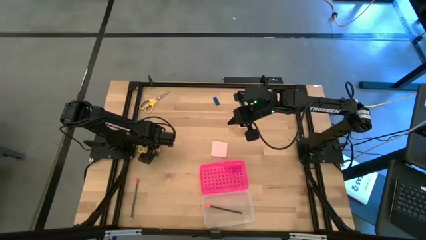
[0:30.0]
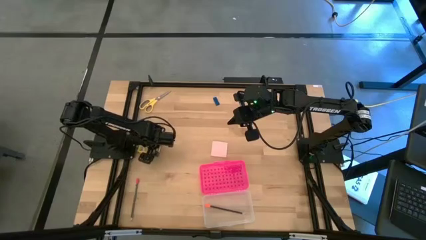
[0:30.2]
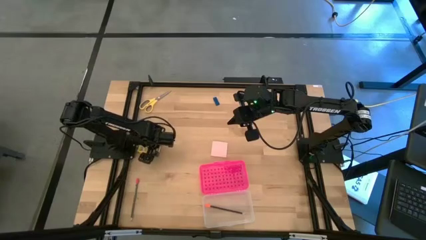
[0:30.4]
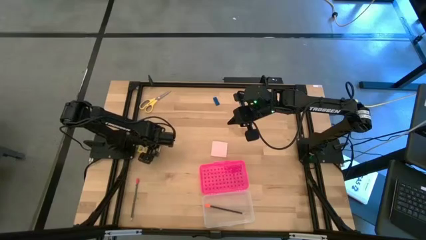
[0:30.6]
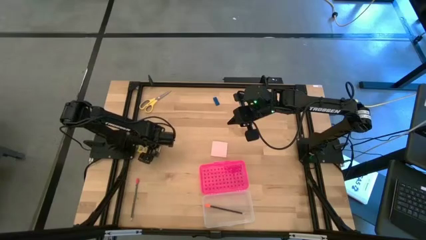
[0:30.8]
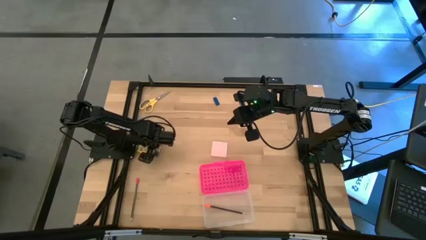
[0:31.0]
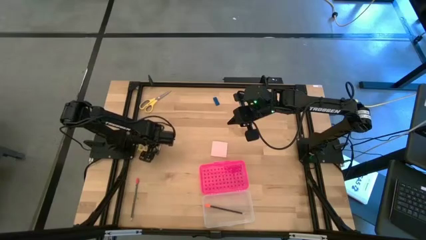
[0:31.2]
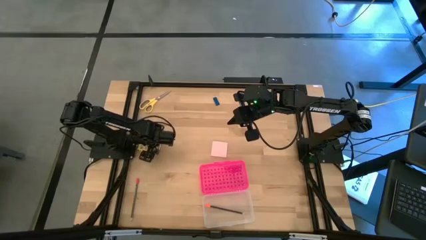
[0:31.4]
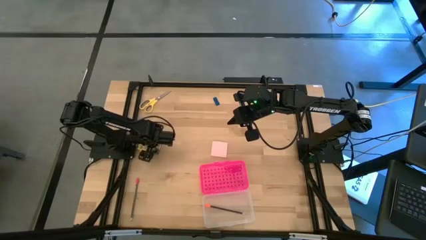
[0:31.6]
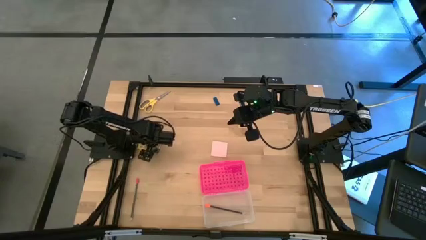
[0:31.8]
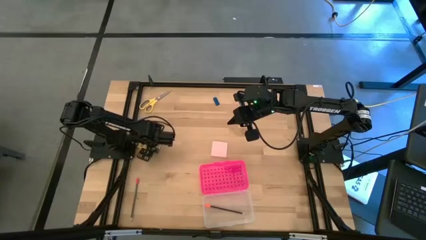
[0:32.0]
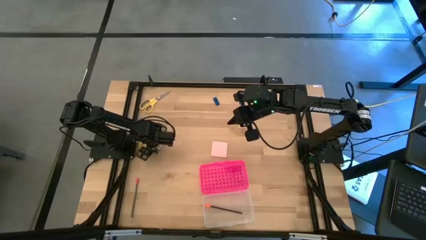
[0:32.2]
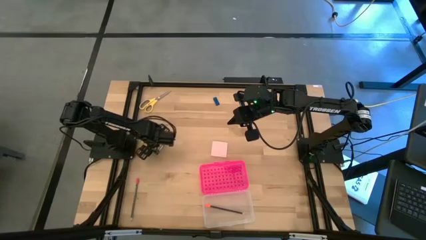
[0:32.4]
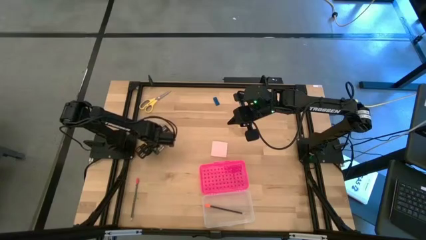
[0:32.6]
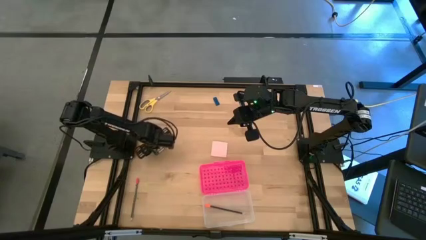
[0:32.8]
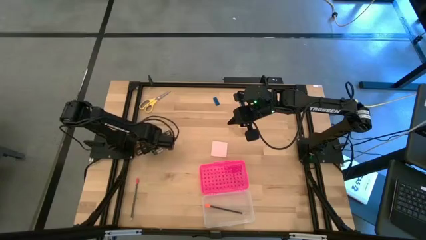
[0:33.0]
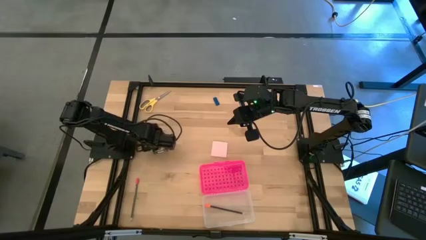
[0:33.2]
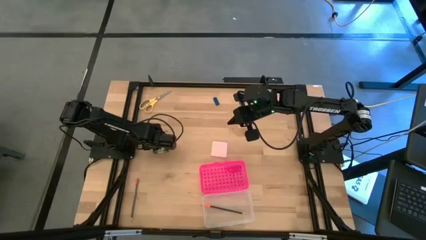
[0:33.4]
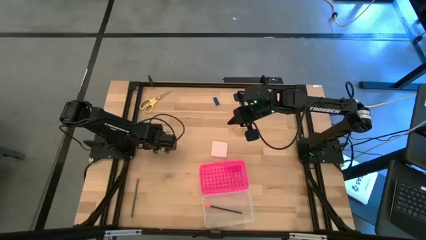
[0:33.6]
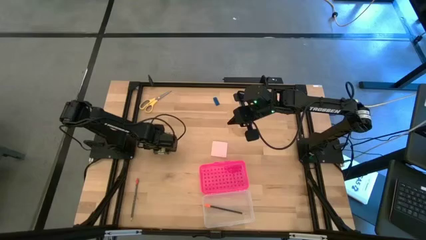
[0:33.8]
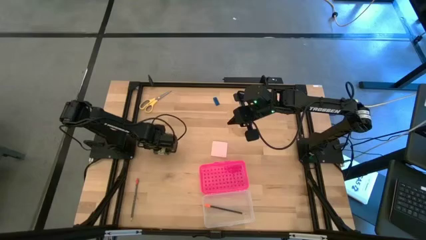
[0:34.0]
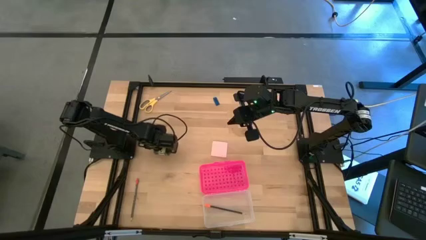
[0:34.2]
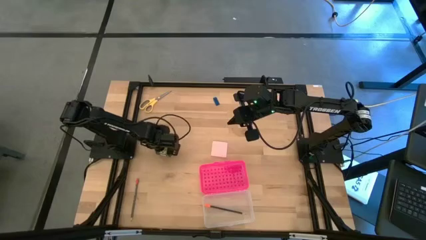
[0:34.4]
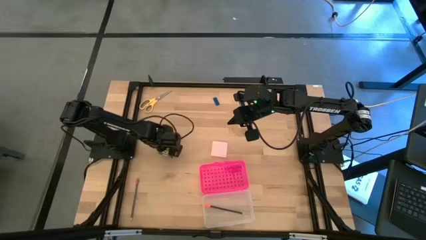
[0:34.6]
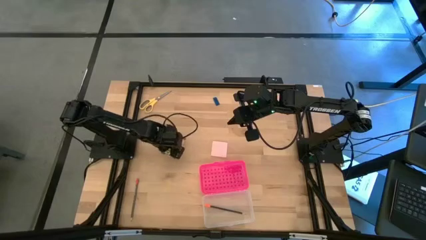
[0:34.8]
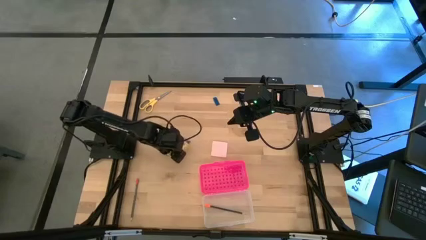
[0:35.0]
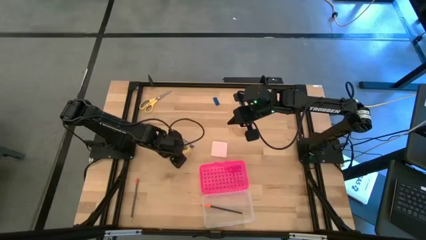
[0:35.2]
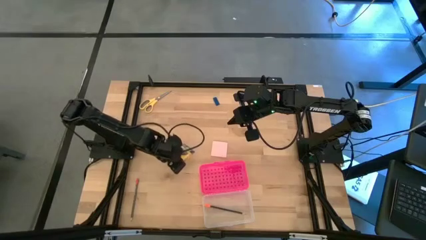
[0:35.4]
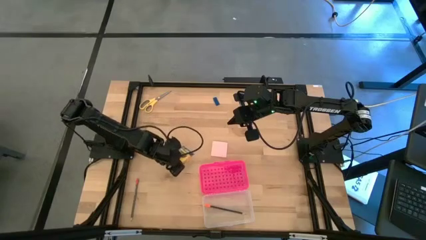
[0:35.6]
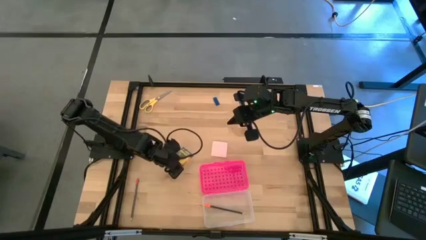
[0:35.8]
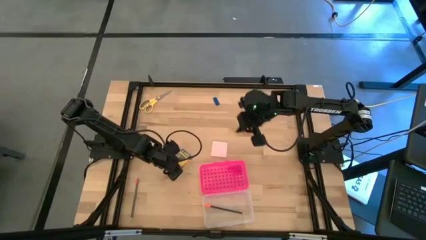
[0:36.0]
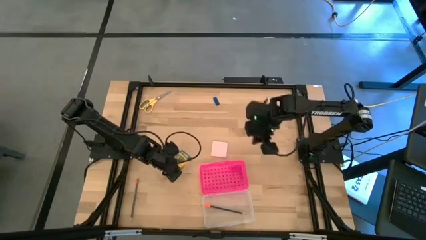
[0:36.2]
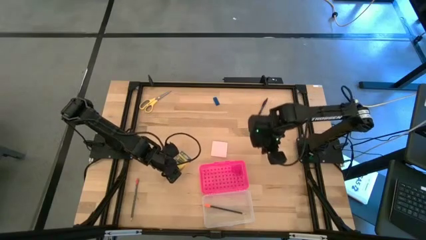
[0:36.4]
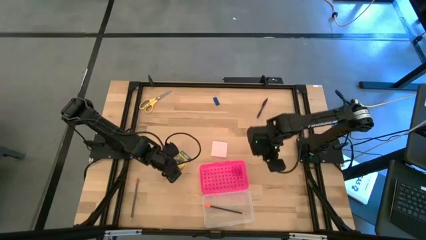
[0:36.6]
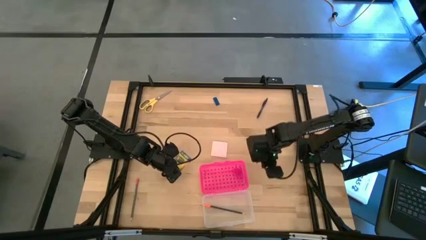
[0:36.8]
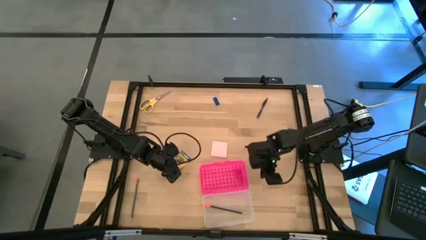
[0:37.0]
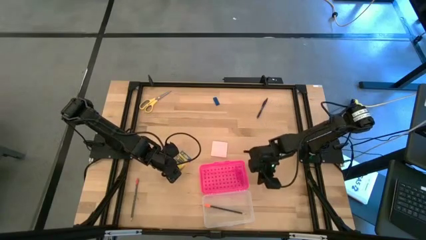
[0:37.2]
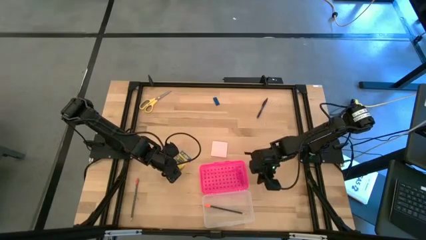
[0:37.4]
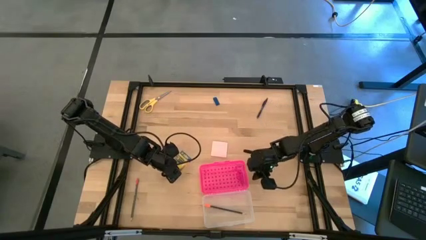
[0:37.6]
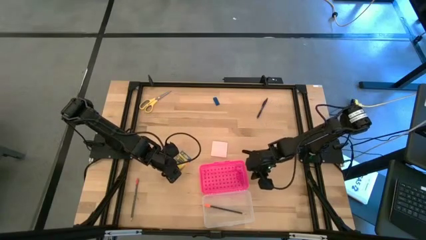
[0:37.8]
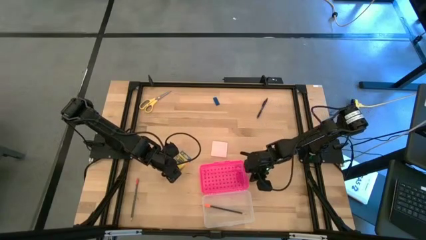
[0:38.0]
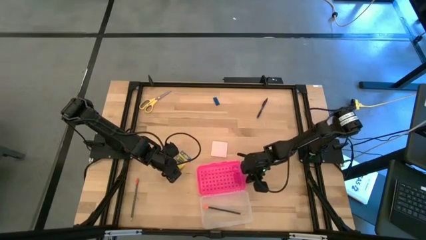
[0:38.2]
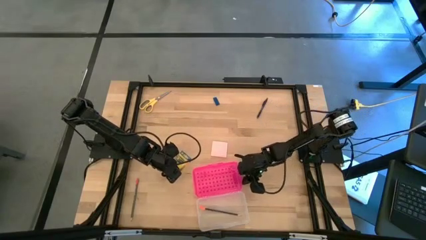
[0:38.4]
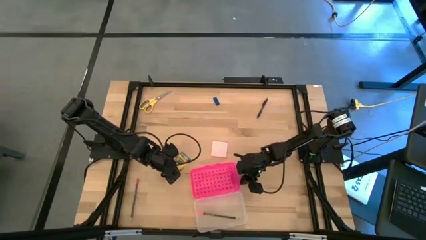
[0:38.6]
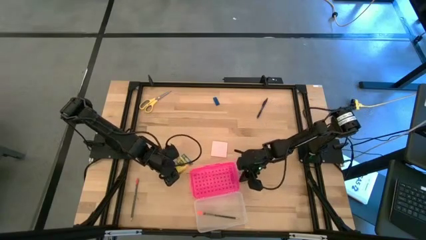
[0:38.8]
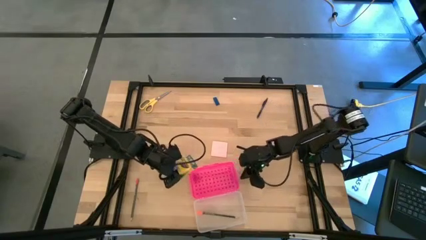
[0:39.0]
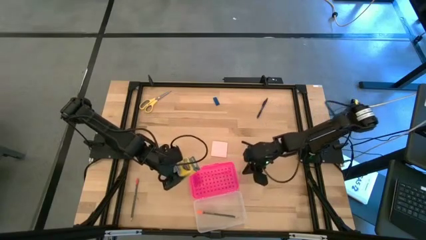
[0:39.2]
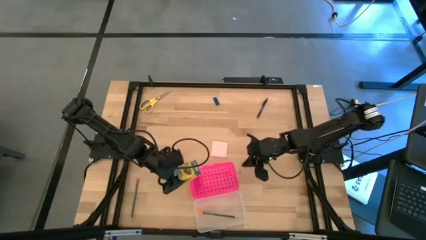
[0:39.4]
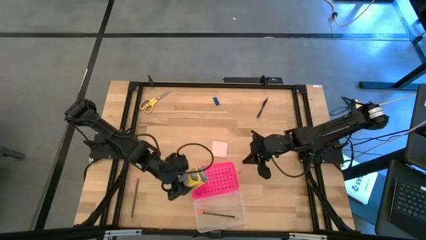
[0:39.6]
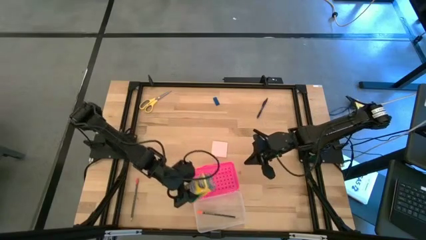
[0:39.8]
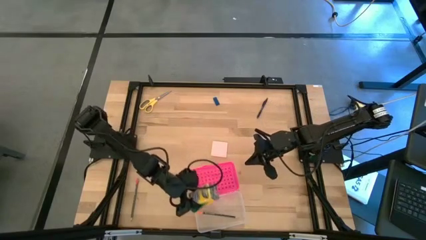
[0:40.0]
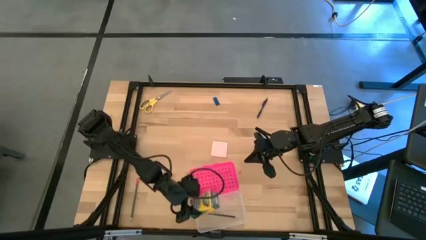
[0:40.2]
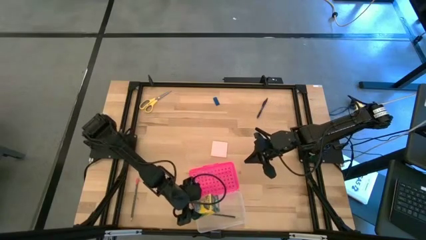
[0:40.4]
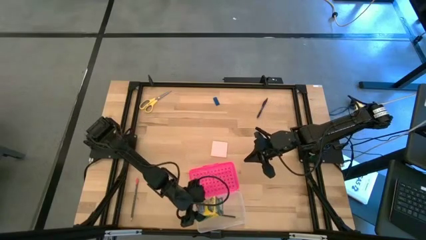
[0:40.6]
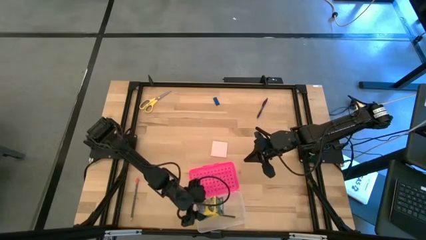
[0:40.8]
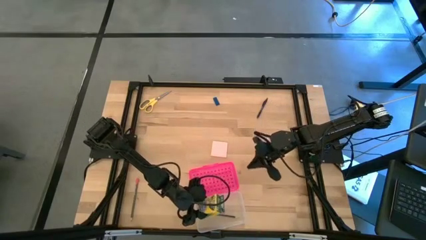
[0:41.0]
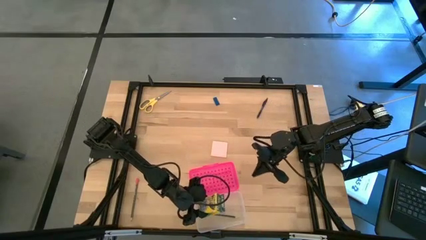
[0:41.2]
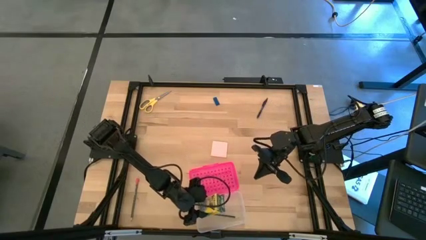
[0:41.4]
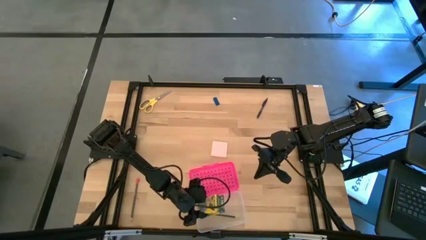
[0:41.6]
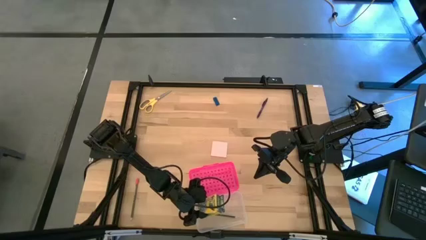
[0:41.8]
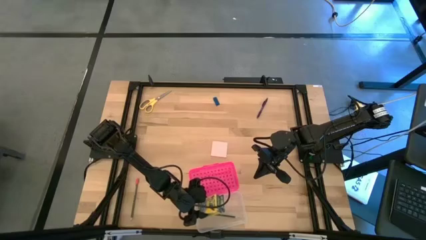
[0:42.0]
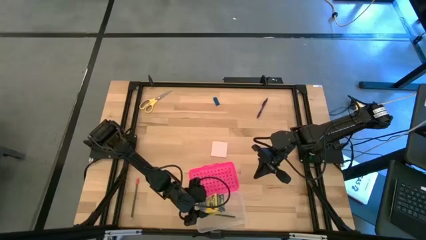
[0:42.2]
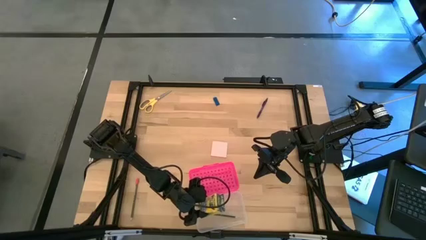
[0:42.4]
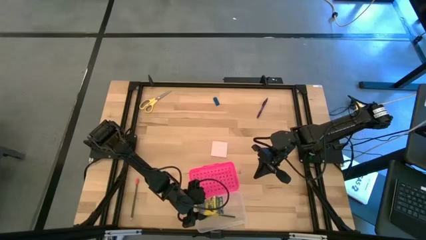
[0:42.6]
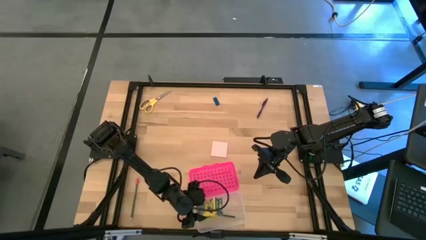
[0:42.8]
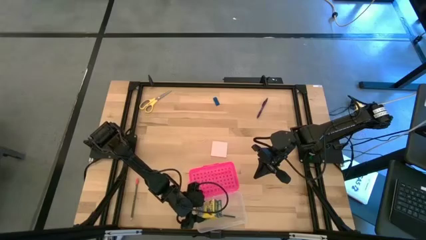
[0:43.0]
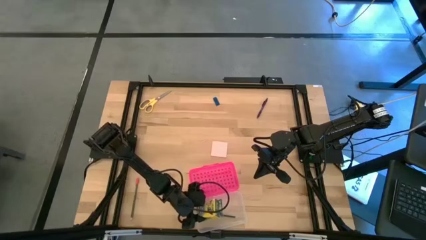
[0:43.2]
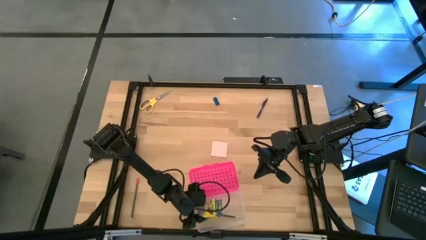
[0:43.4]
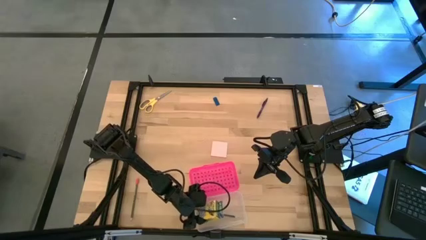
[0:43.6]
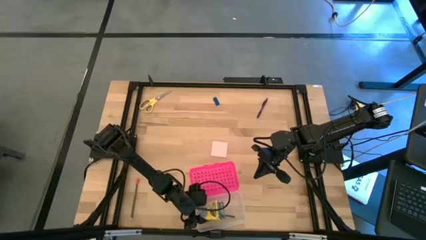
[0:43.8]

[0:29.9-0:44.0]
Task: Pack school essentials
Put the yellow crayon box into the pink supply box
